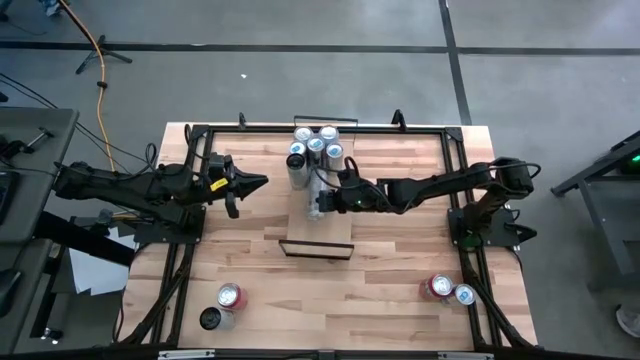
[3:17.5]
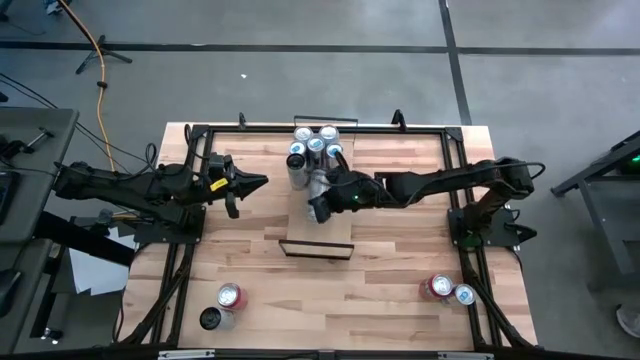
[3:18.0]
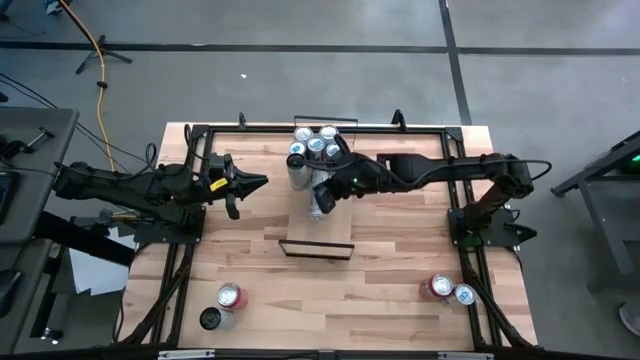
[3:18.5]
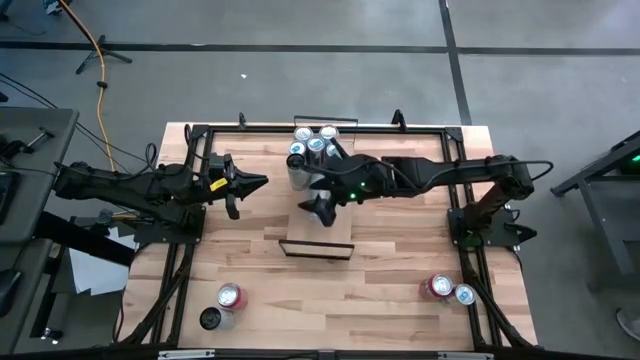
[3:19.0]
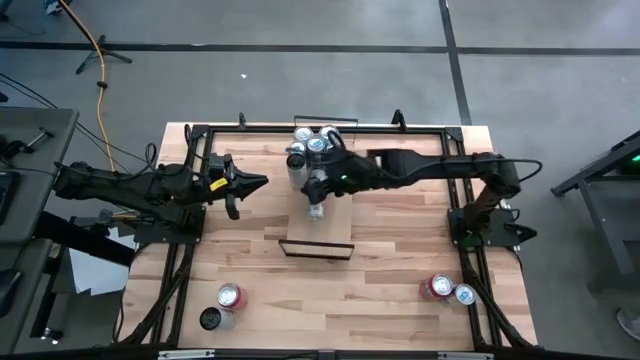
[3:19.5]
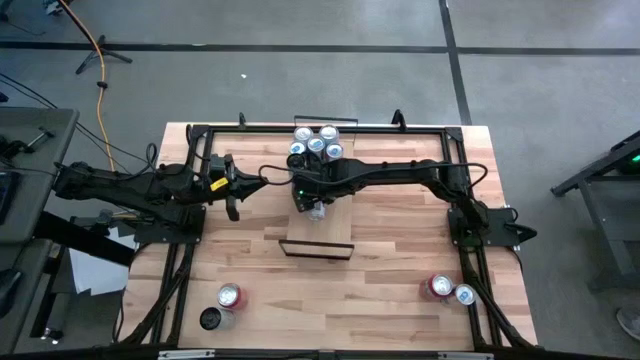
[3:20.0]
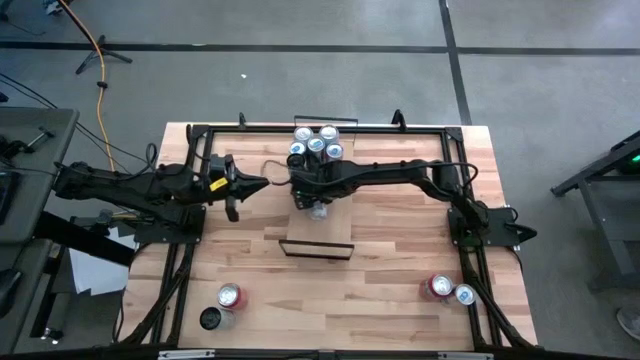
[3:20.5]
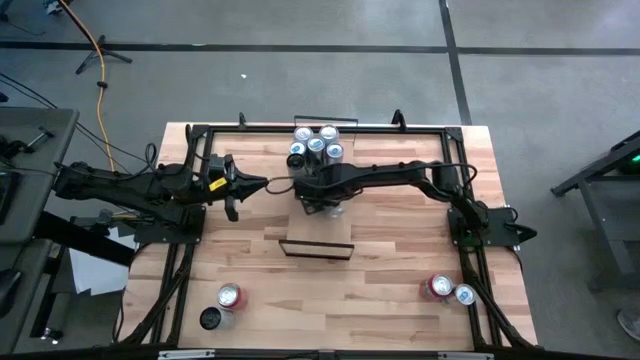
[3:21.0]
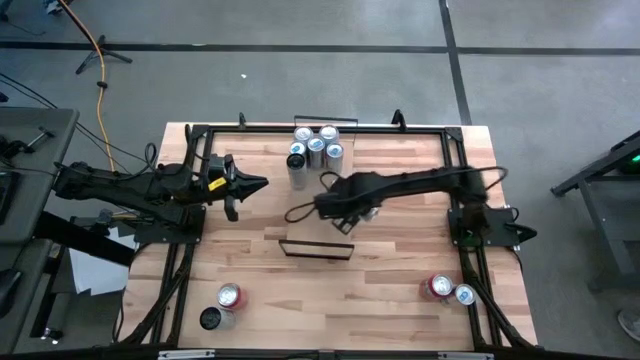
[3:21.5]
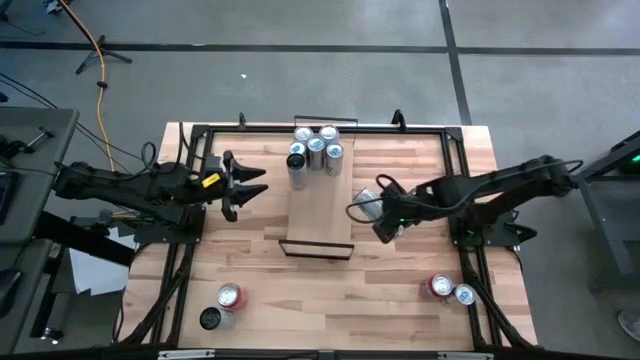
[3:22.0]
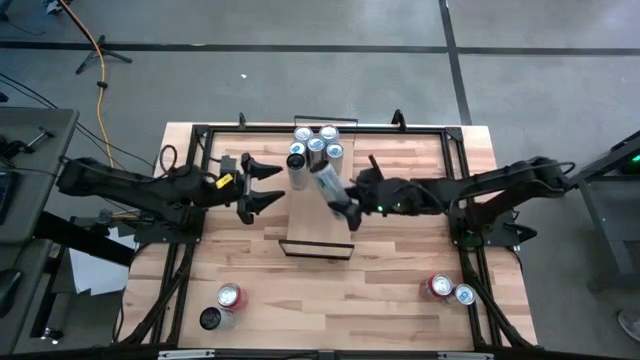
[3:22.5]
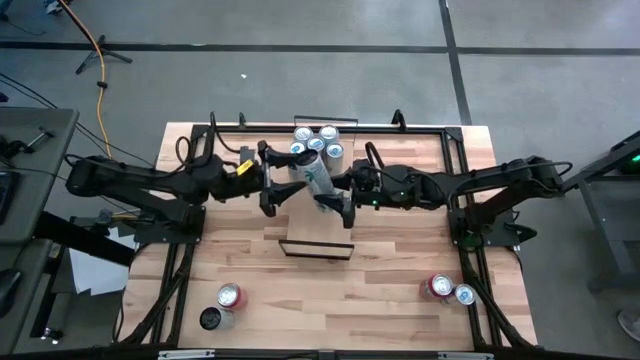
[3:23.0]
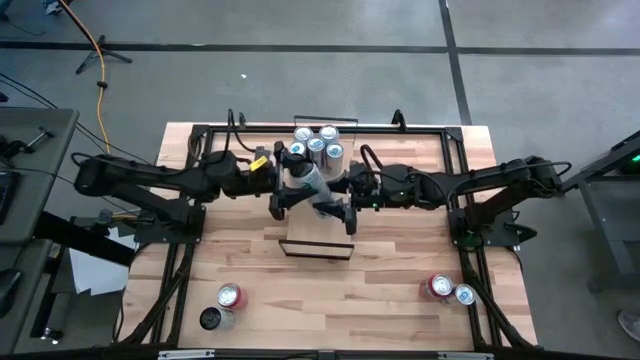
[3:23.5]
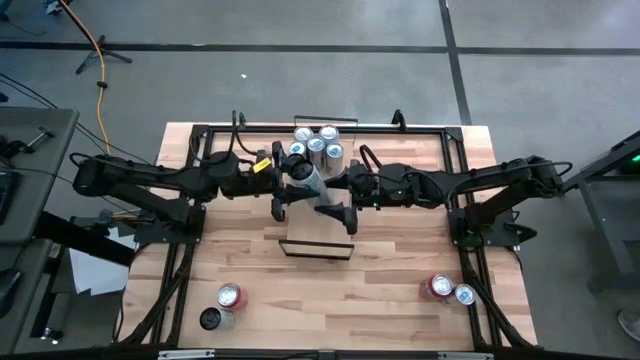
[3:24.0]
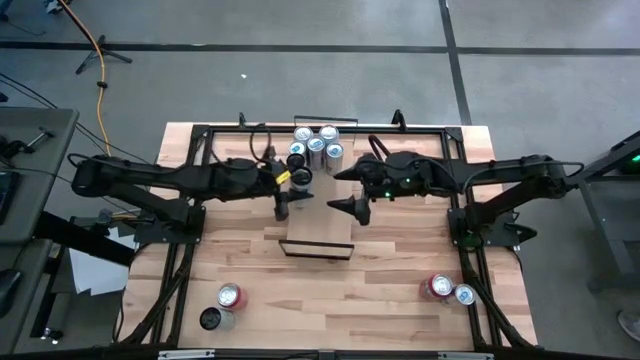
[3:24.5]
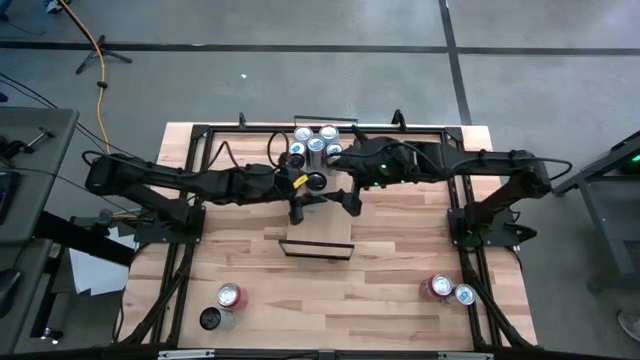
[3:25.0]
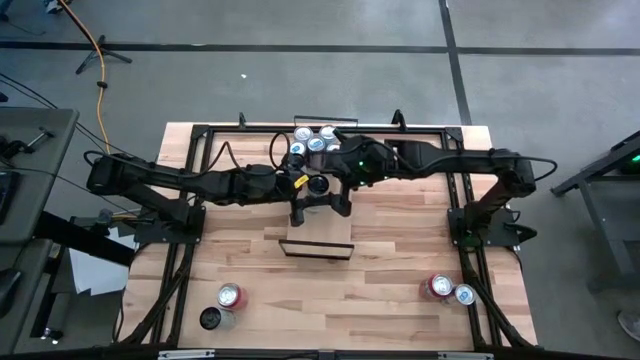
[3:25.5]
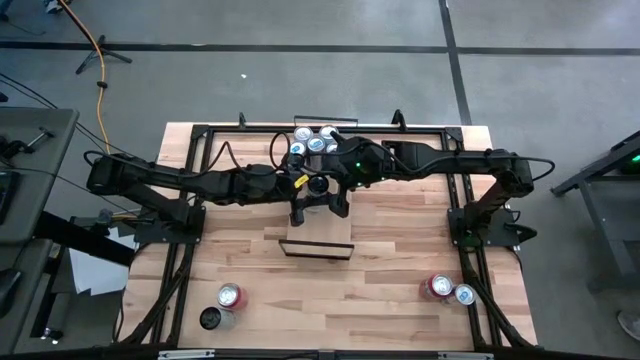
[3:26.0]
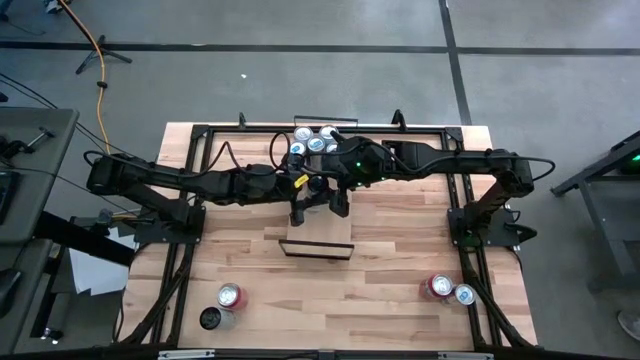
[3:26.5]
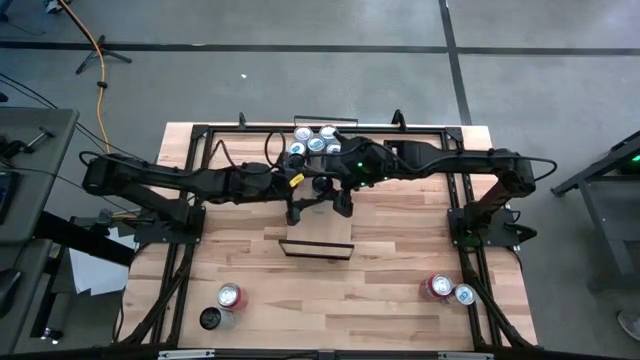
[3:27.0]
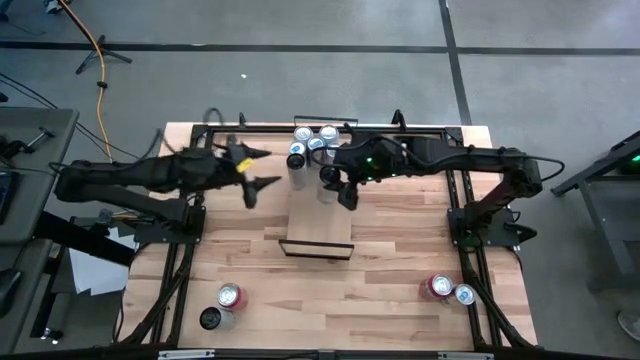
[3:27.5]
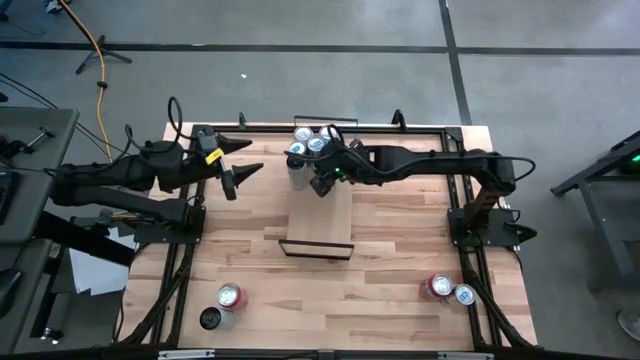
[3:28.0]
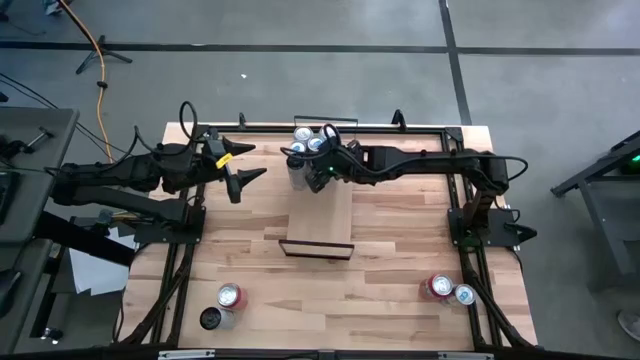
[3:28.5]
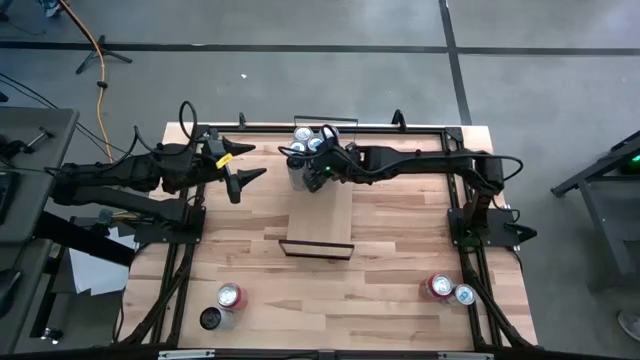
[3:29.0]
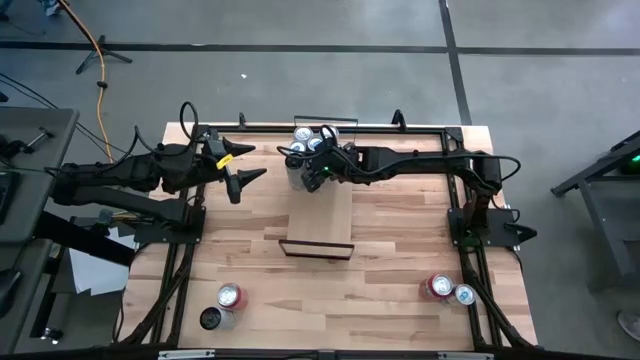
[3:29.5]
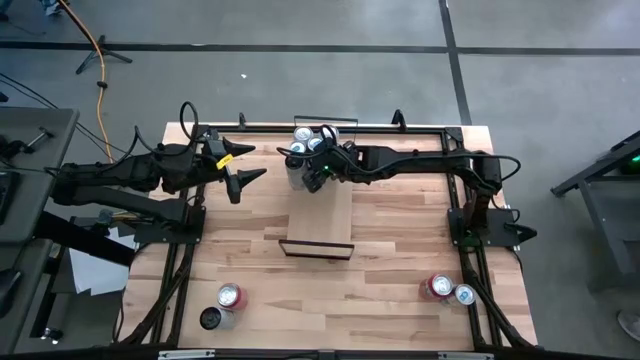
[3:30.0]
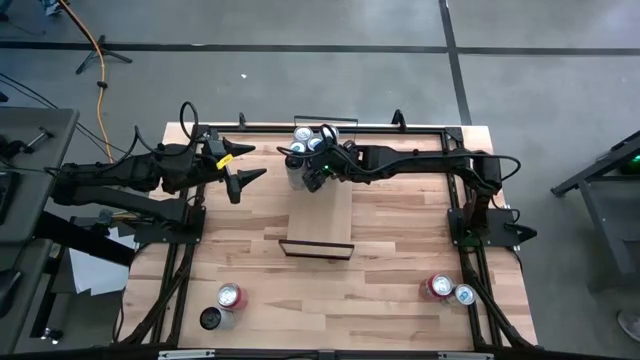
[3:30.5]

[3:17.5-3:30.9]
Task: Place canned beverage on shelf
Put the white pink soda can on the shelf aligned with the other white pink soda can

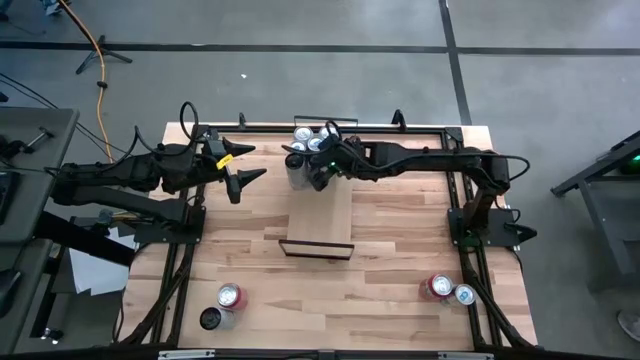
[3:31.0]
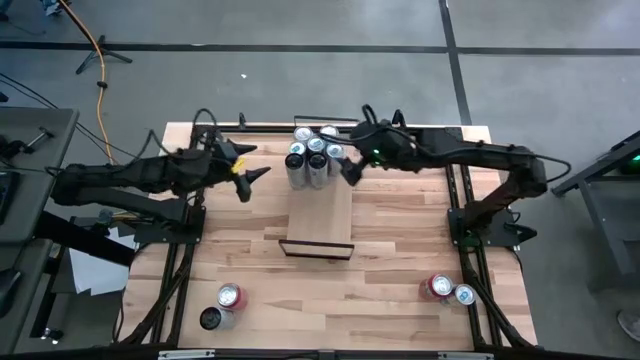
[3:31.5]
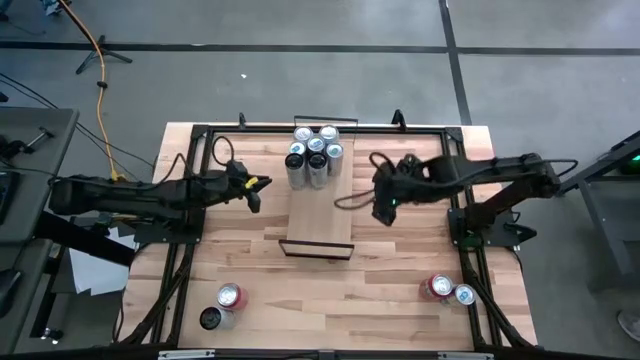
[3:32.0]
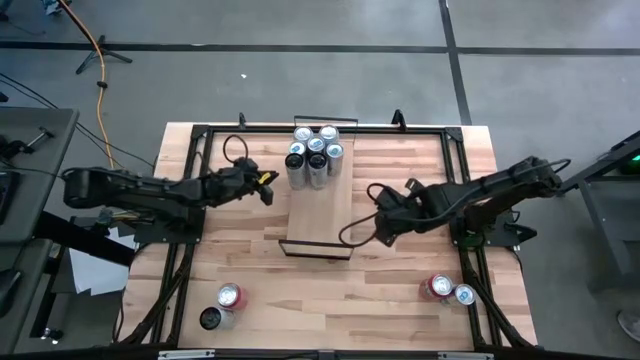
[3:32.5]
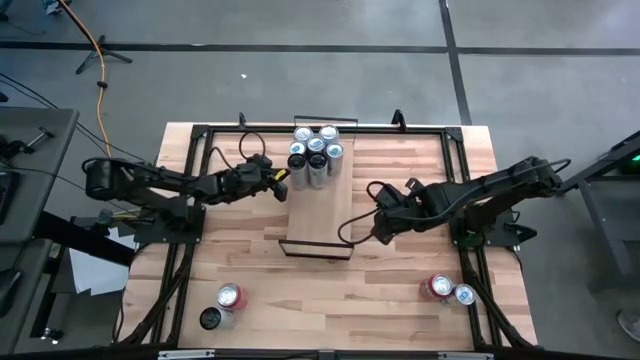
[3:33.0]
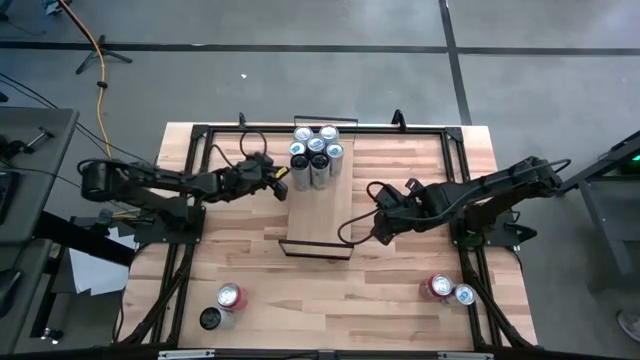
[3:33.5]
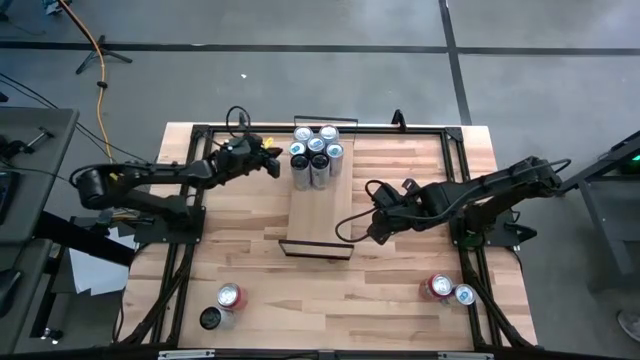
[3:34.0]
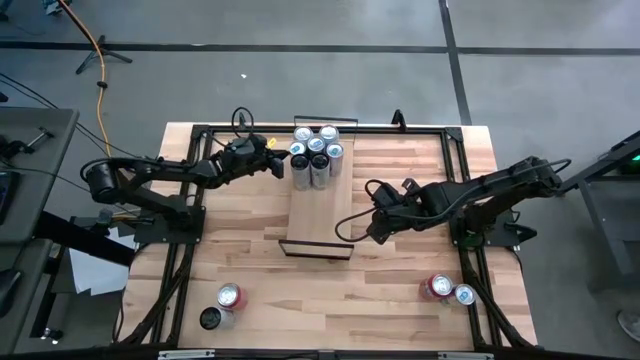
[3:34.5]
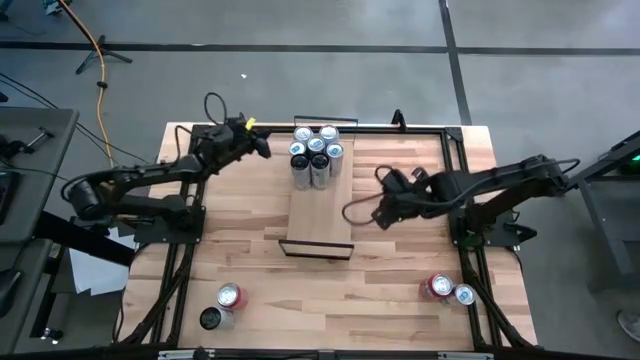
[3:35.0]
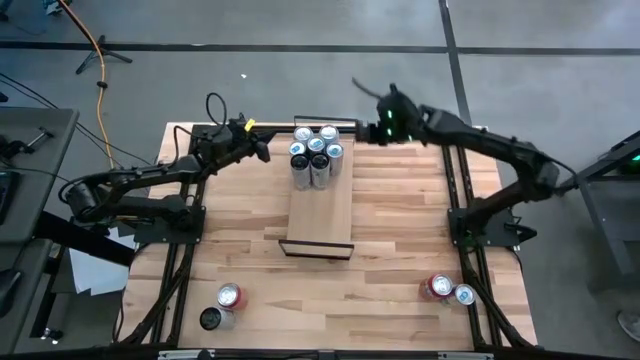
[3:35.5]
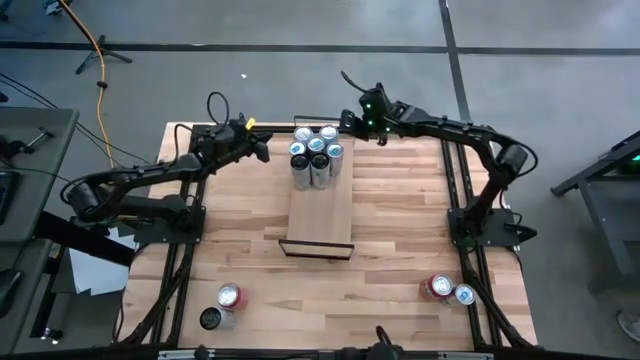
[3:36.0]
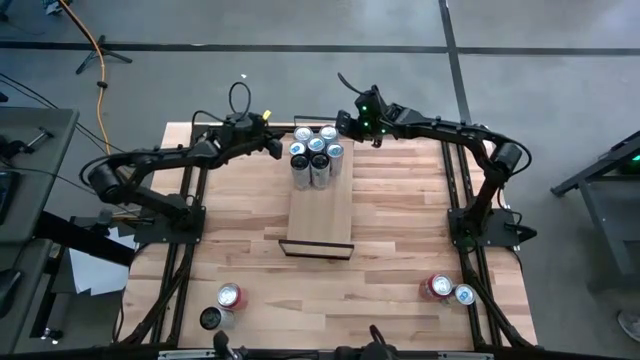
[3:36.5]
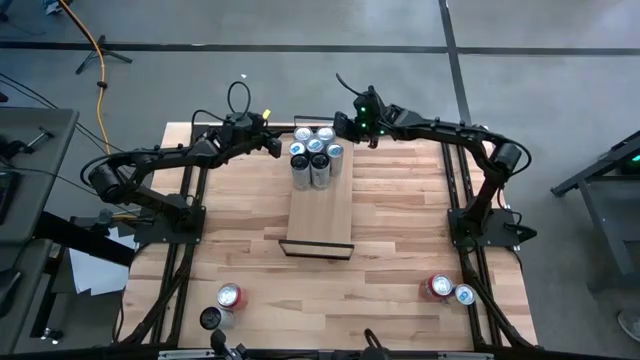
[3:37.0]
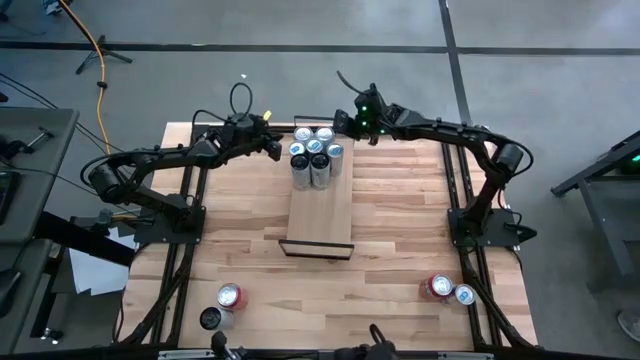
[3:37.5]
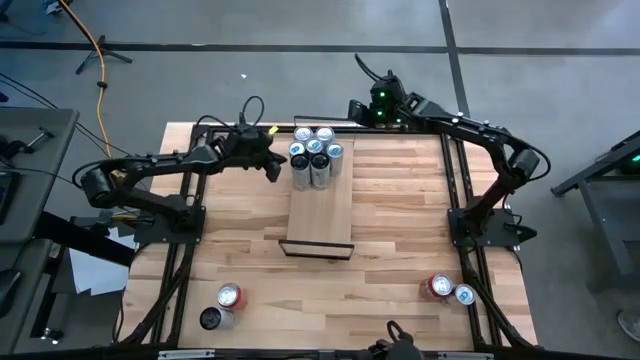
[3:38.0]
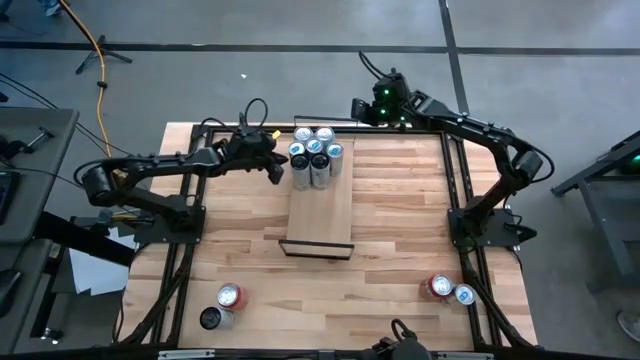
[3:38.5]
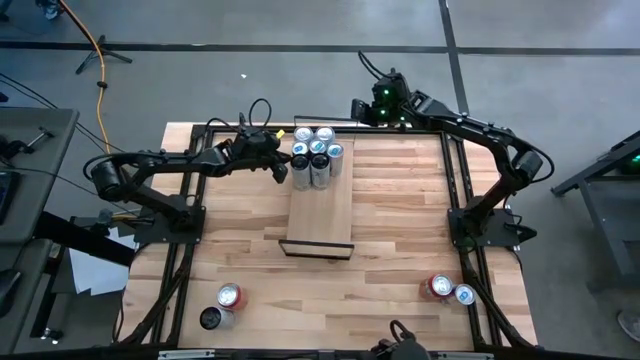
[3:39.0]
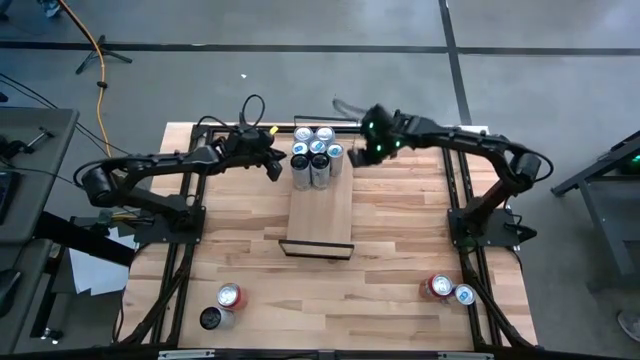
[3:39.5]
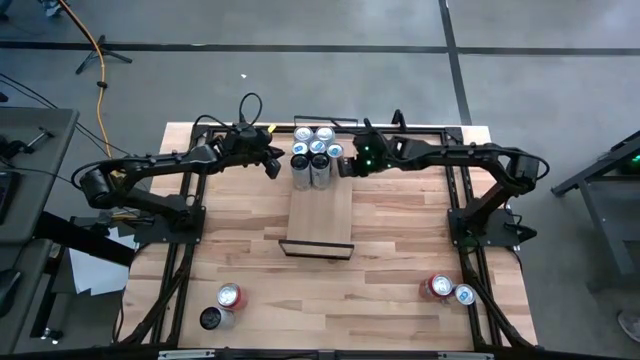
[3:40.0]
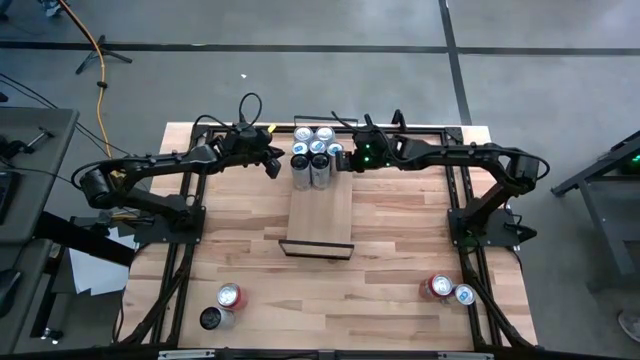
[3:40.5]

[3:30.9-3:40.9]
Adjust the soda cans on the shelf
